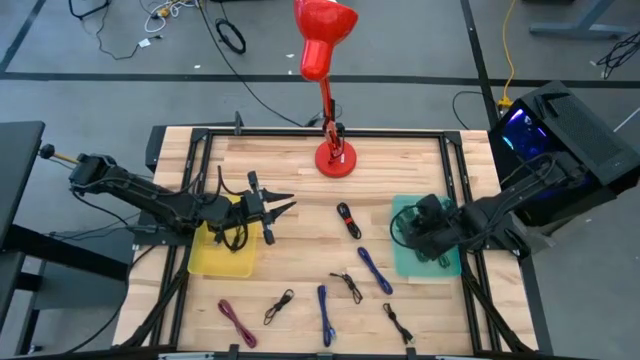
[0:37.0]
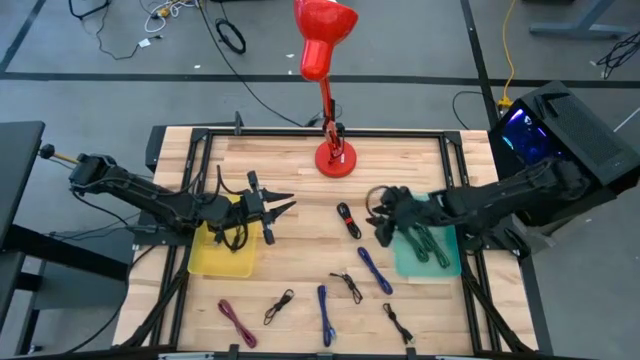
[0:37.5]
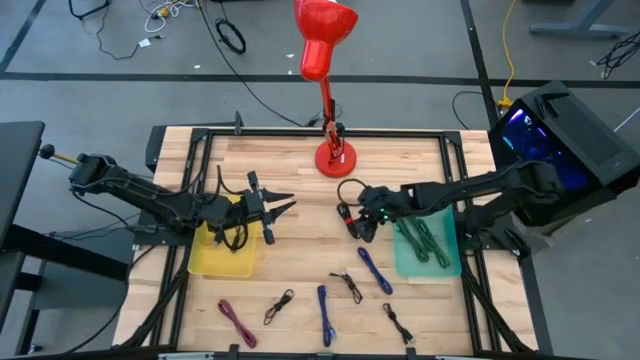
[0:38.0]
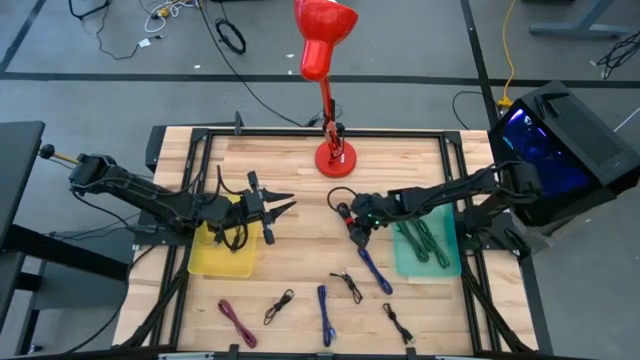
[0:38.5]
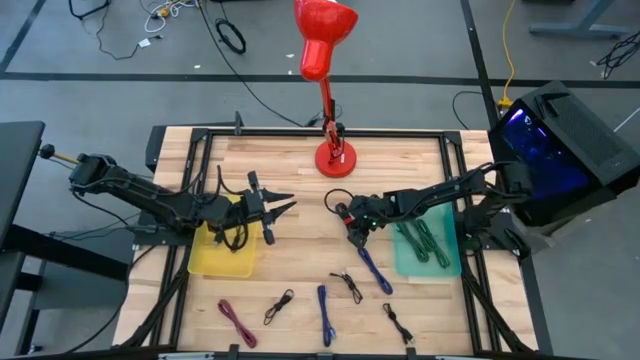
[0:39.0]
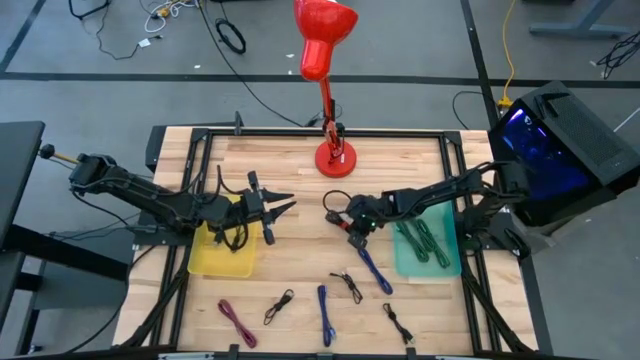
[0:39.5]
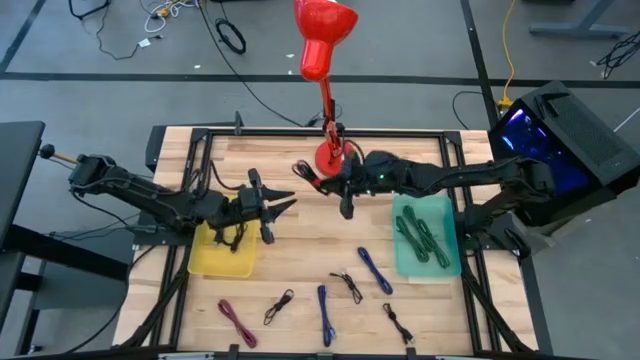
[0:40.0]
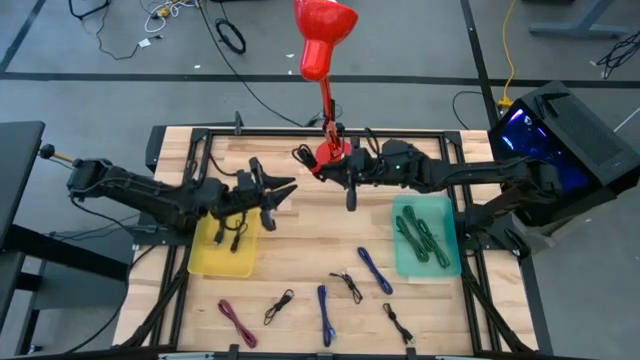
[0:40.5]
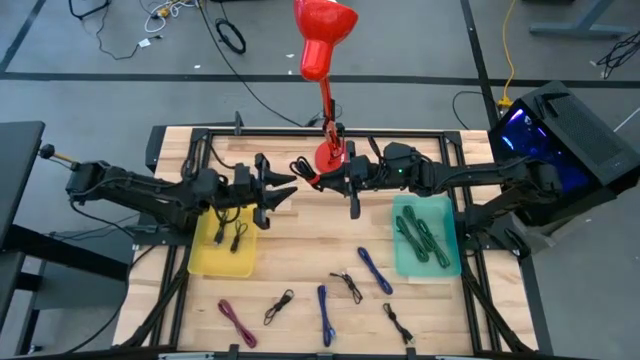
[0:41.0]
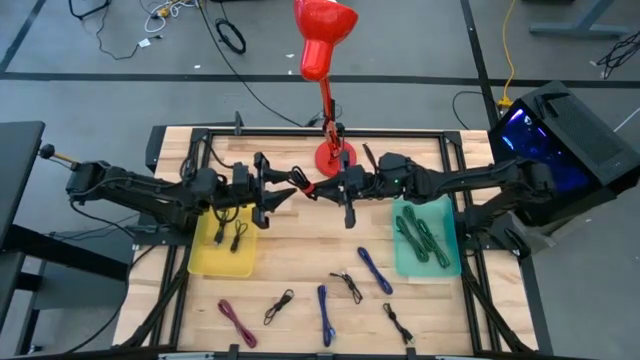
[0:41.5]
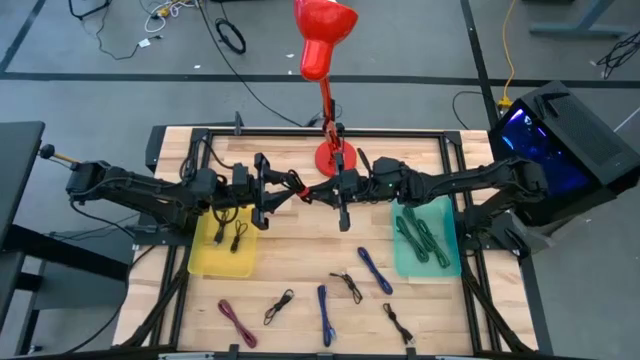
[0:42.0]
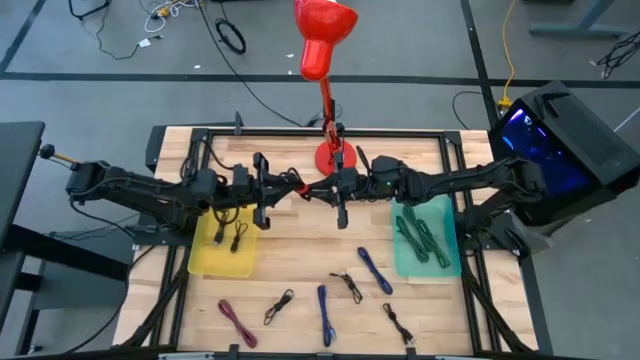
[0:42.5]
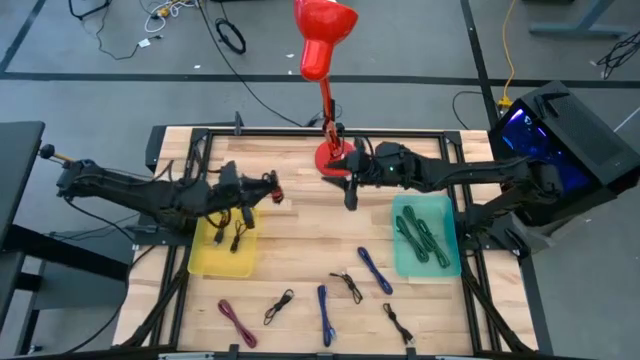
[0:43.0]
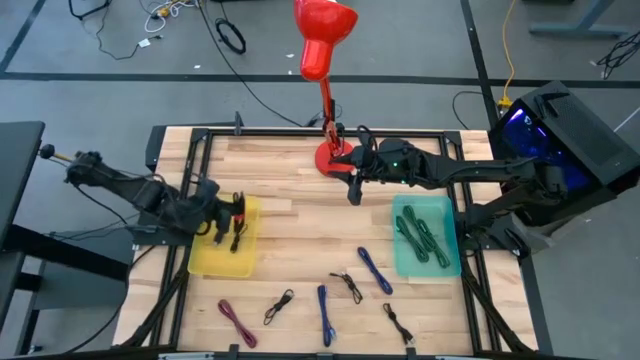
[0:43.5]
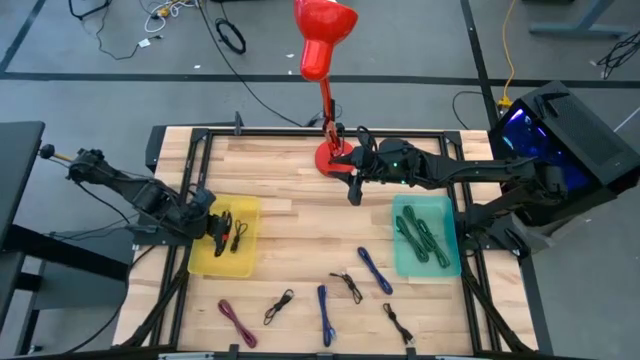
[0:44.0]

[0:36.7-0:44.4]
Task: Pick & Place USB Port
Put the black USB cable with the red tape into the yellow transparent bin

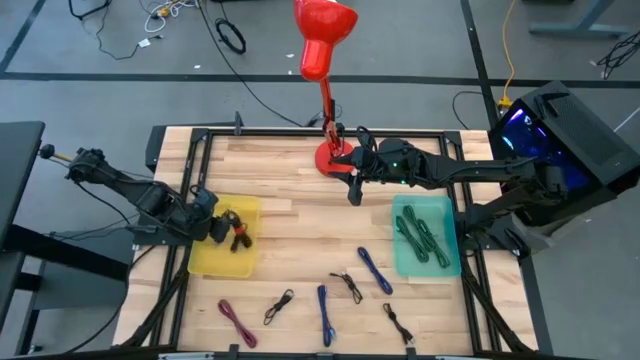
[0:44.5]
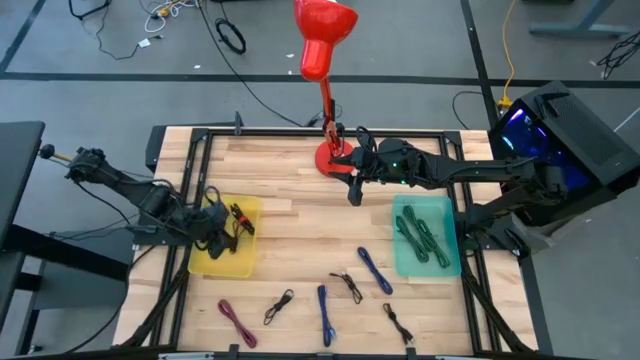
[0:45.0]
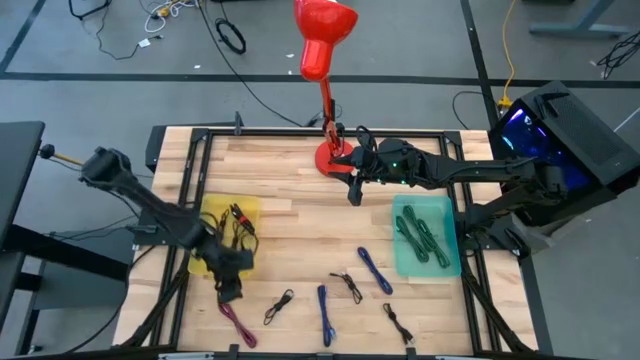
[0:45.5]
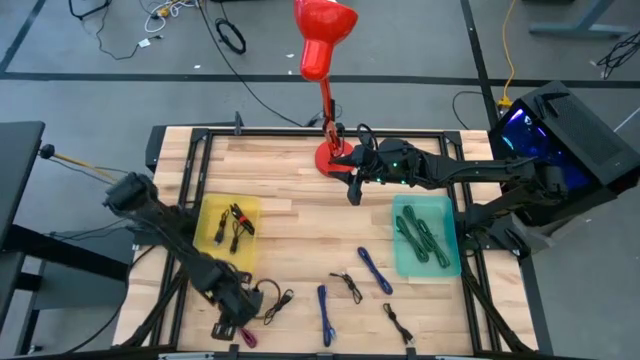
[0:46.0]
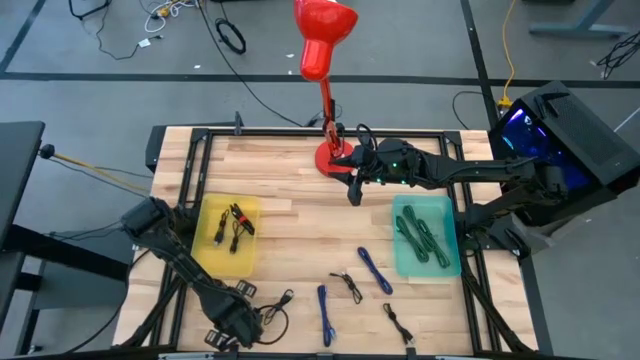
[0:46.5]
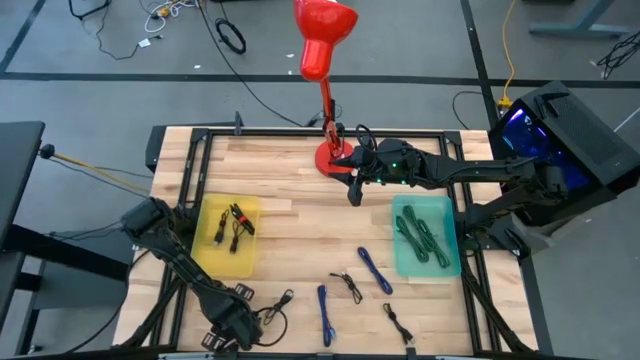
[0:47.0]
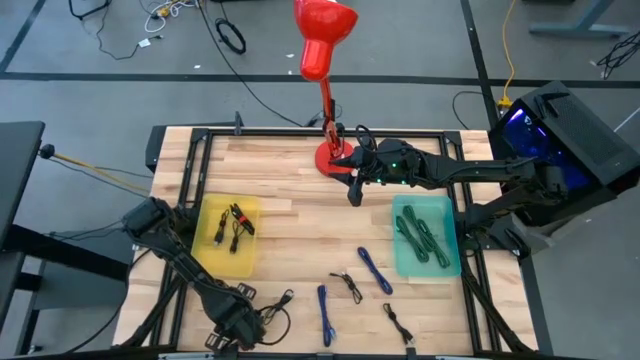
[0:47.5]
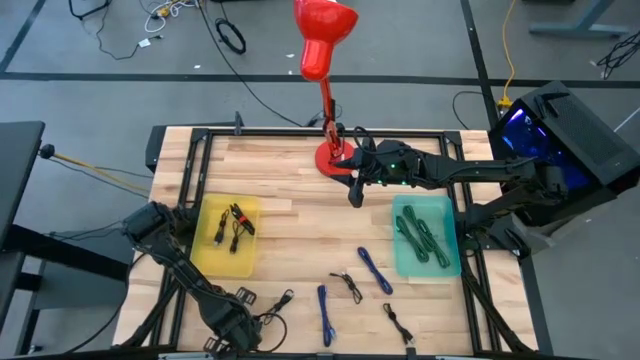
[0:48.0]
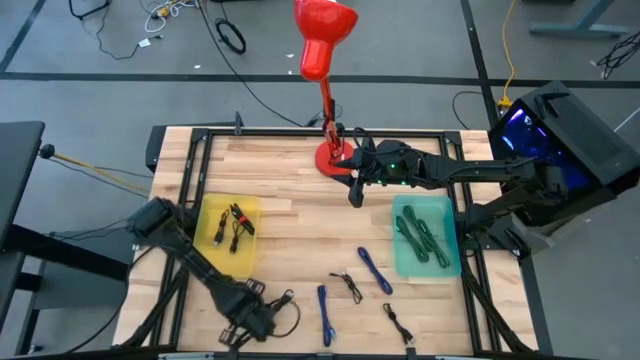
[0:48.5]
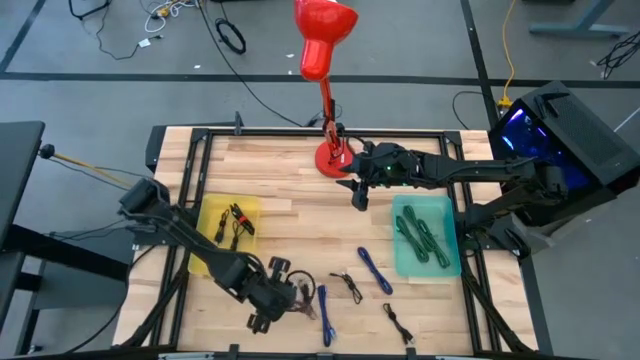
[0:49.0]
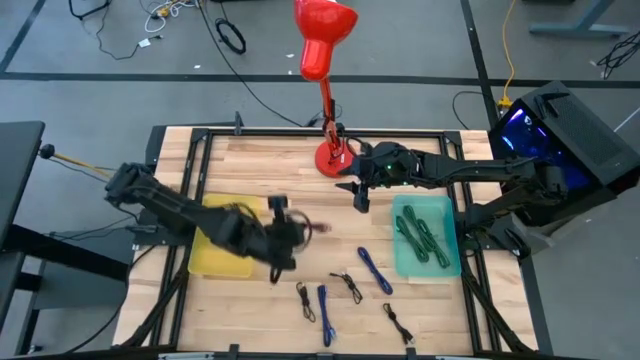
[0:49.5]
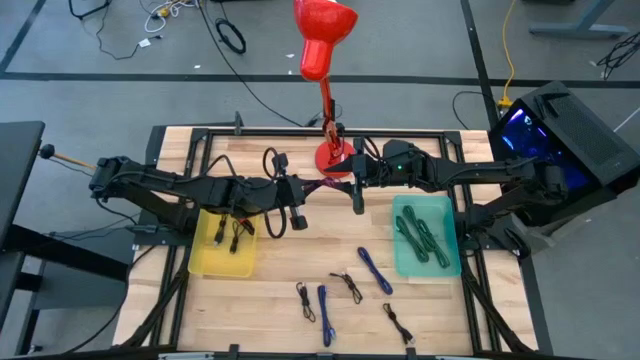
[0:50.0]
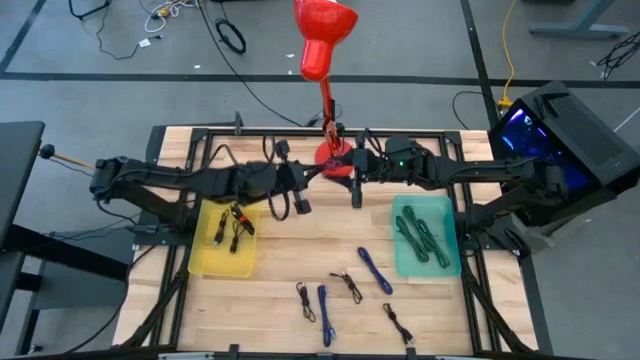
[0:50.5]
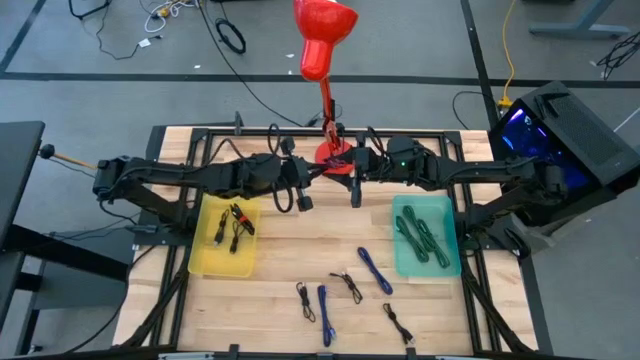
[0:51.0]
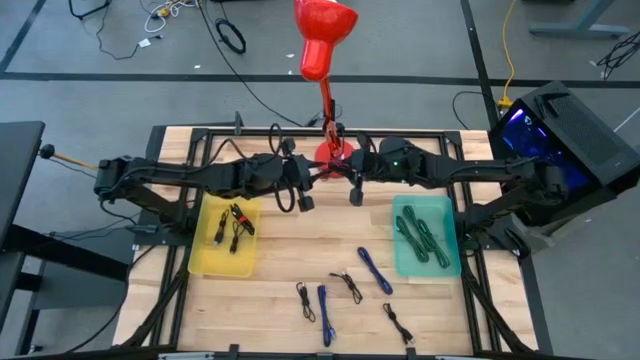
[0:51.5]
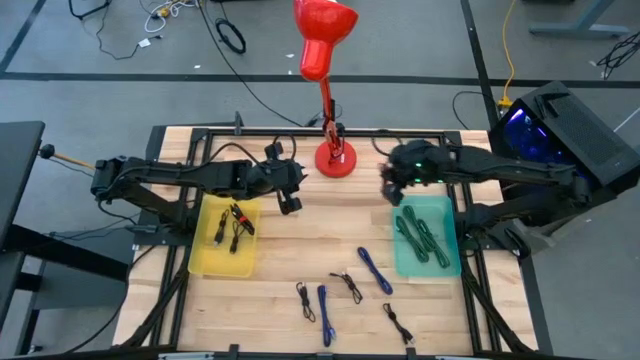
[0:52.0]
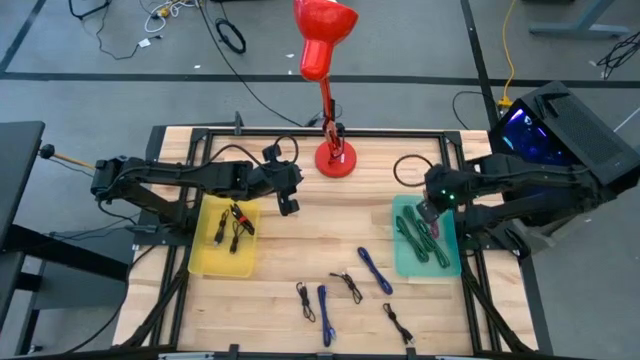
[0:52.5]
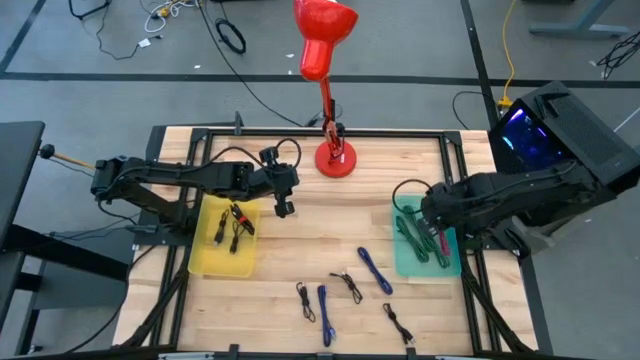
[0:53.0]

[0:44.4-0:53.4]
Put the pink USB cable into the blue transparent bin

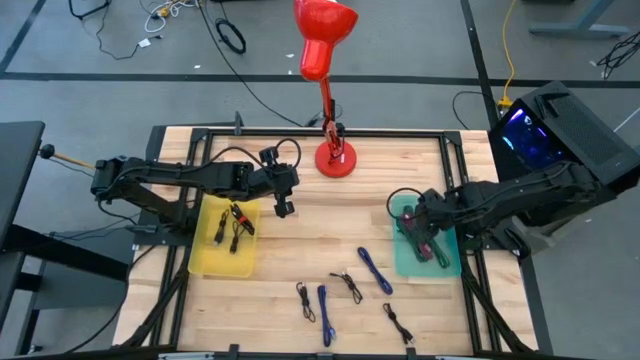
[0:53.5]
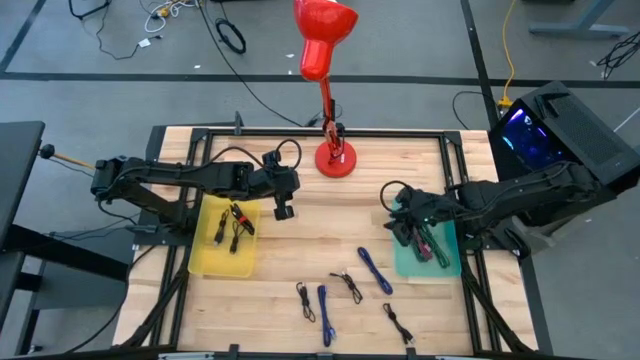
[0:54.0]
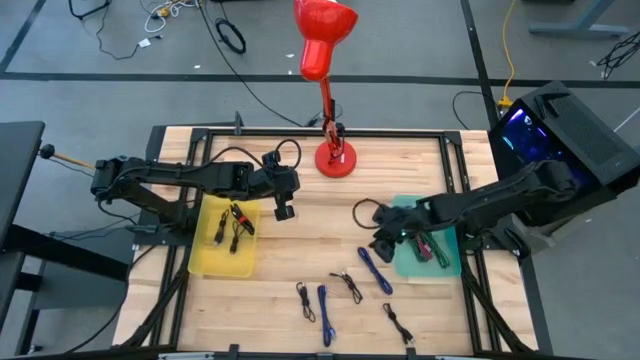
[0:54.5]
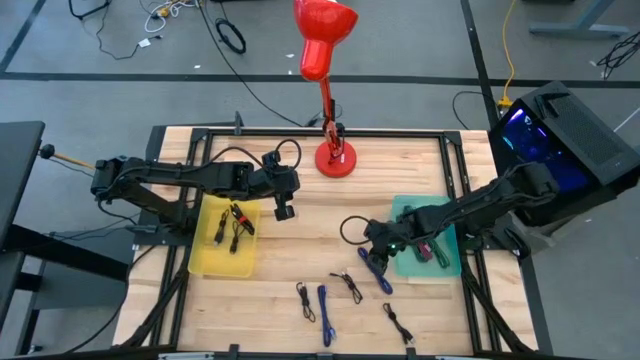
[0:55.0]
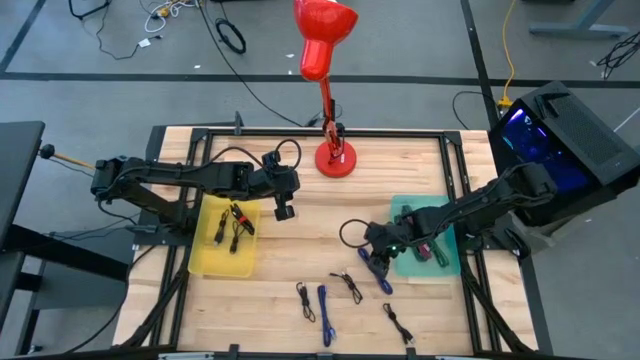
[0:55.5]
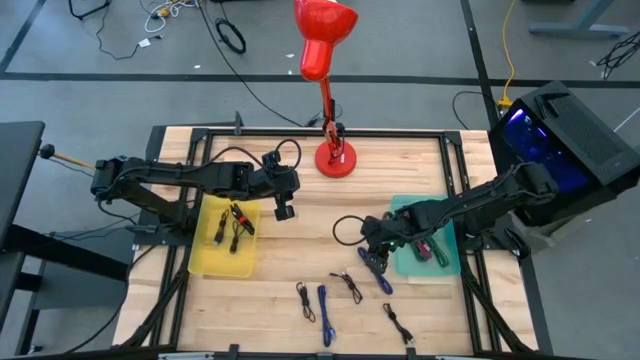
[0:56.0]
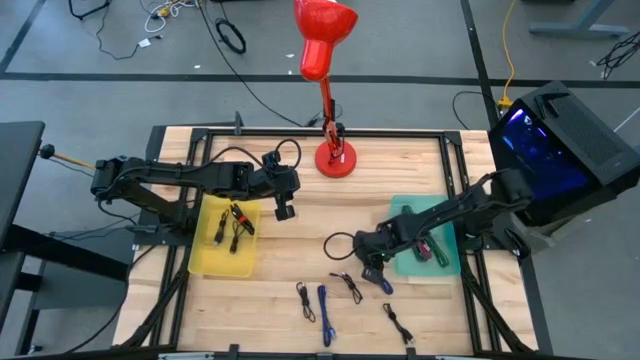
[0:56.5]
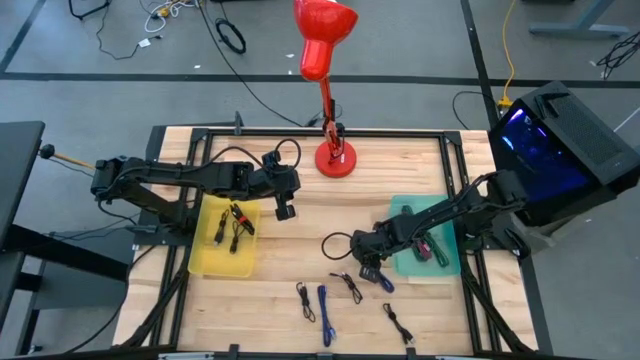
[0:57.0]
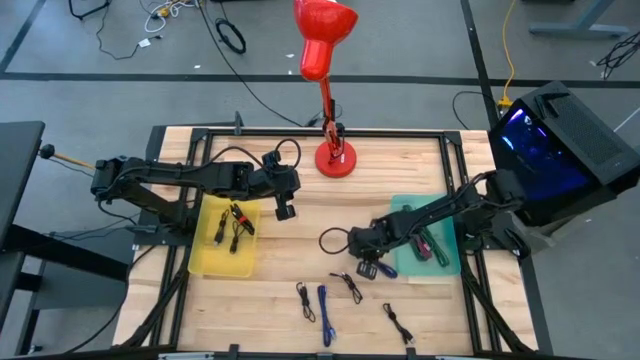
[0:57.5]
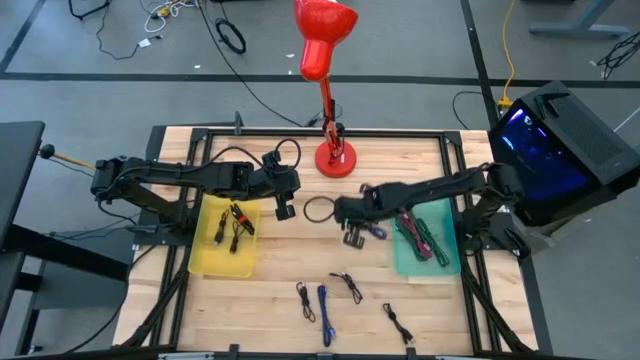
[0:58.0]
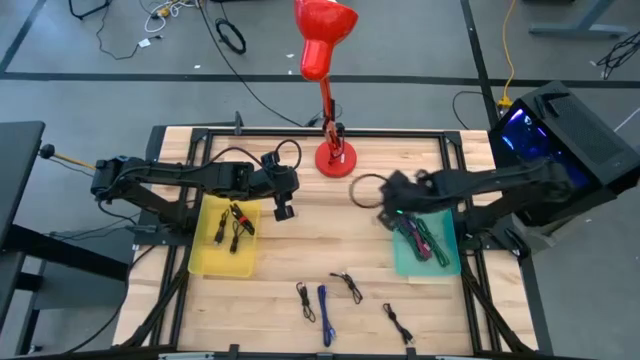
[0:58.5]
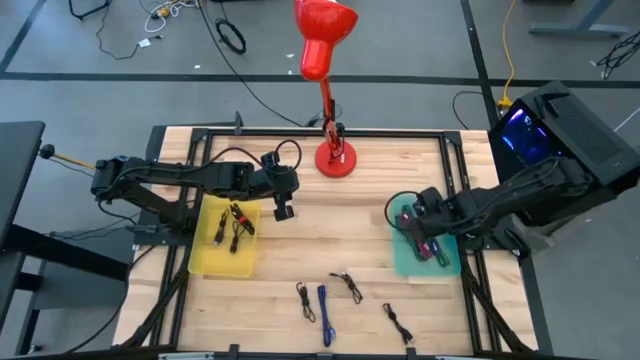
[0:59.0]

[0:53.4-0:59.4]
Put the top blue USB cable into the blue transparent bin
